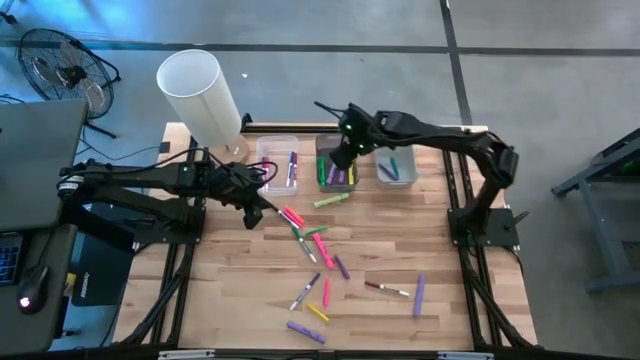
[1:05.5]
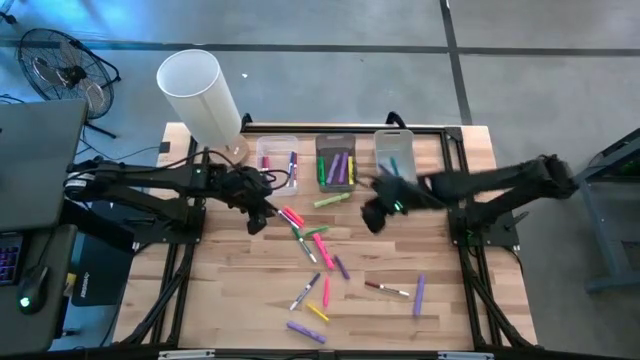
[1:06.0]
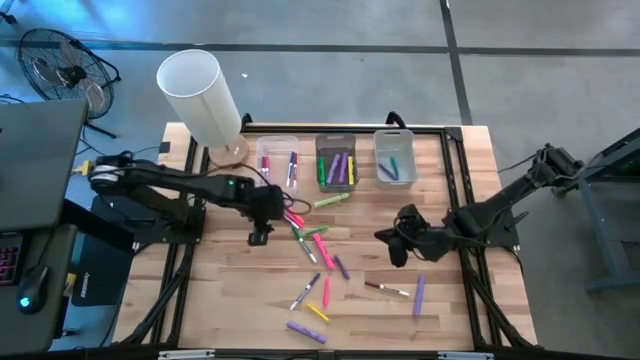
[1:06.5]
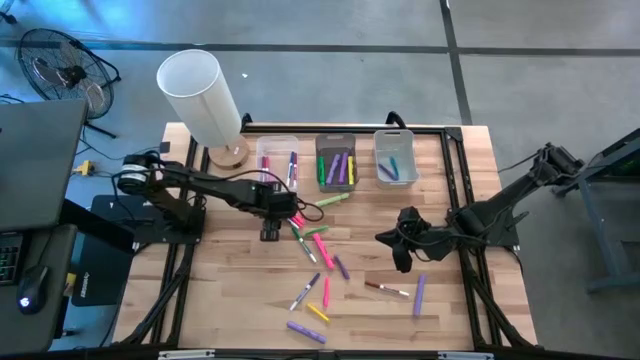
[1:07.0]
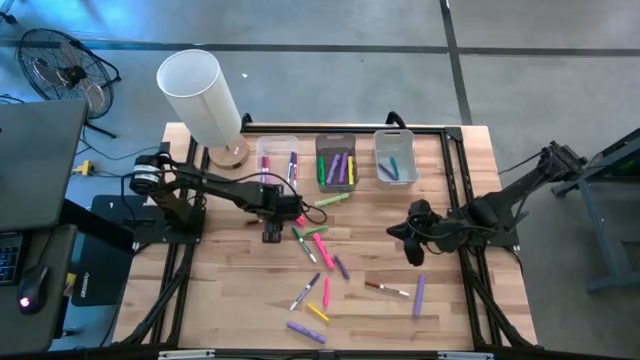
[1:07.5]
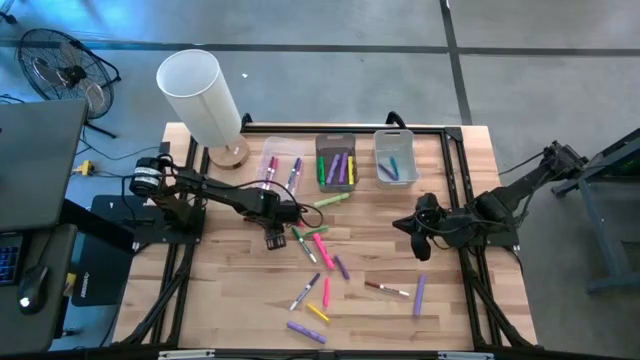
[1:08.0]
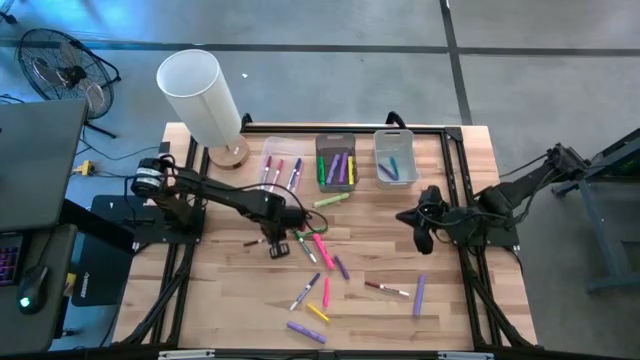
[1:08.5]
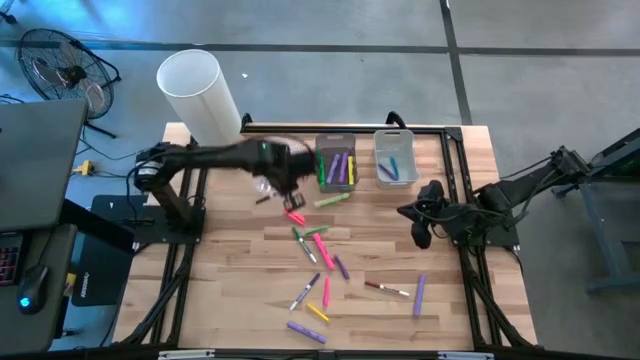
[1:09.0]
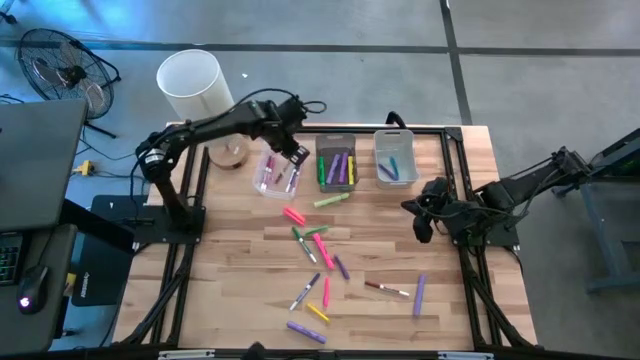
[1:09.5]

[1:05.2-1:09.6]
Task: Pick & Place Markers
Put the black dry erase marker into the transparent bin

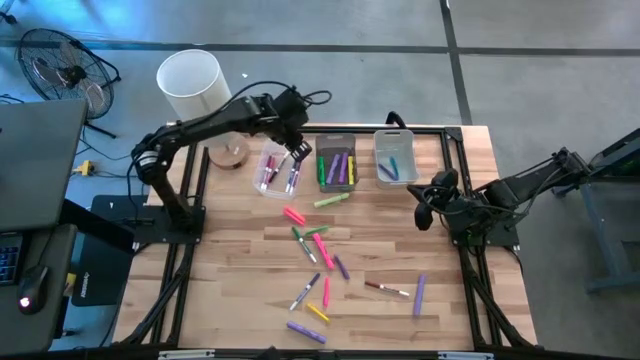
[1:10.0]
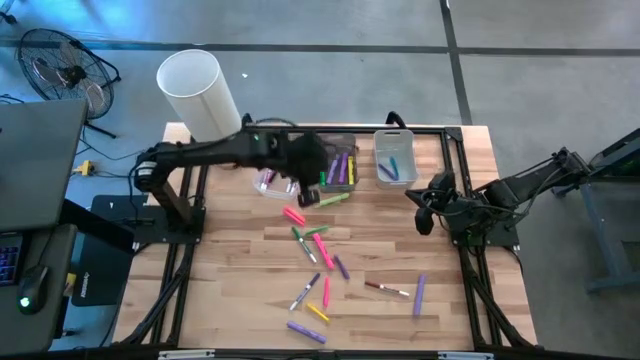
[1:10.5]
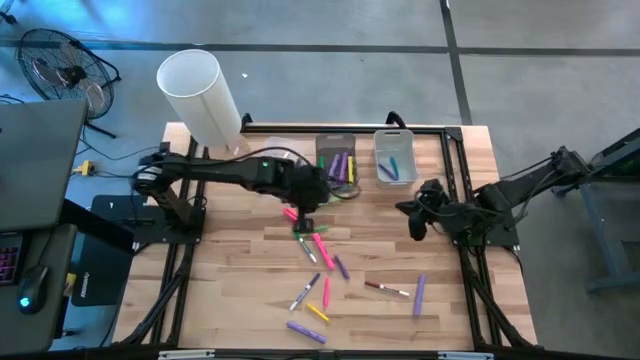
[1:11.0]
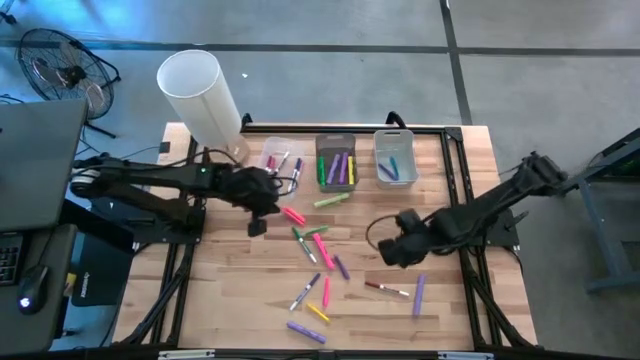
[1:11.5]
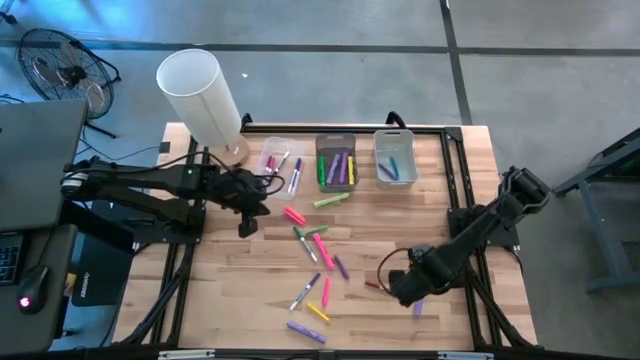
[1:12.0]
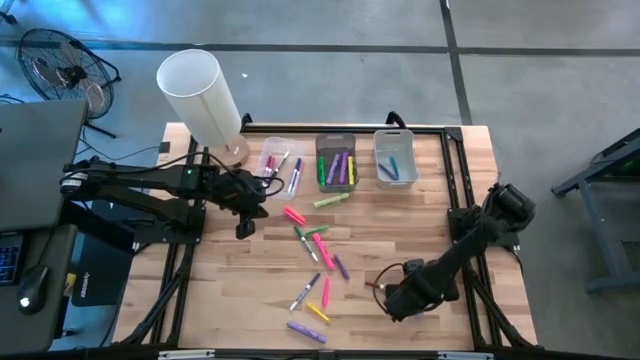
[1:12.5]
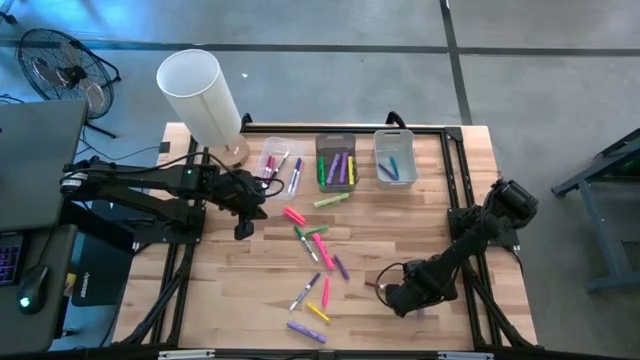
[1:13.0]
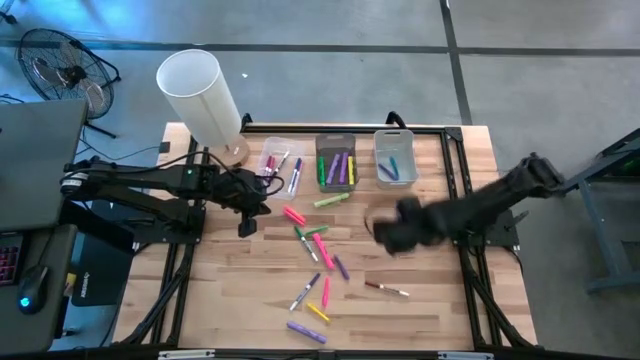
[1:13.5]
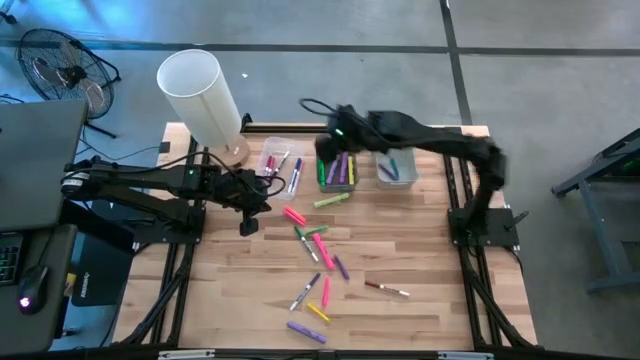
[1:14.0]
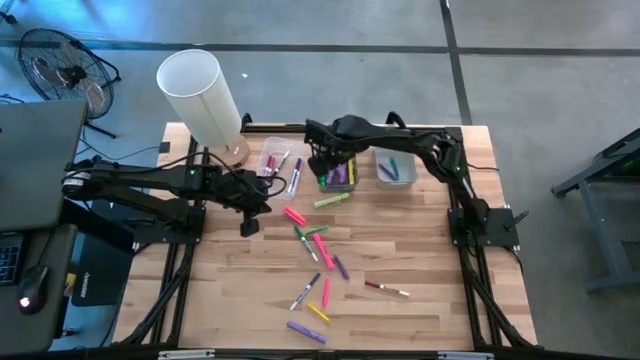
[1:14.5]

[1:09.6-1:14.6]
Put the right violet highlighter into the black bin

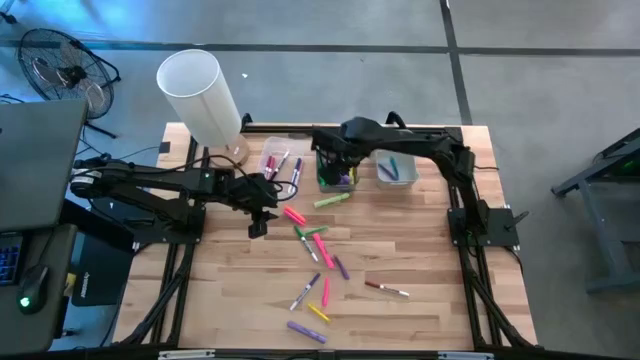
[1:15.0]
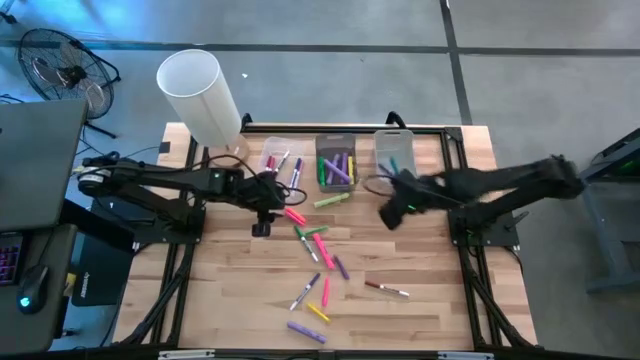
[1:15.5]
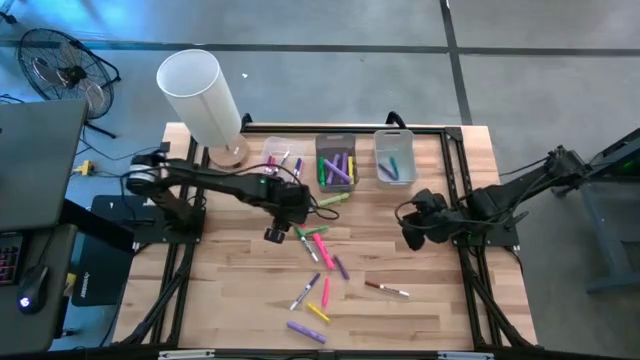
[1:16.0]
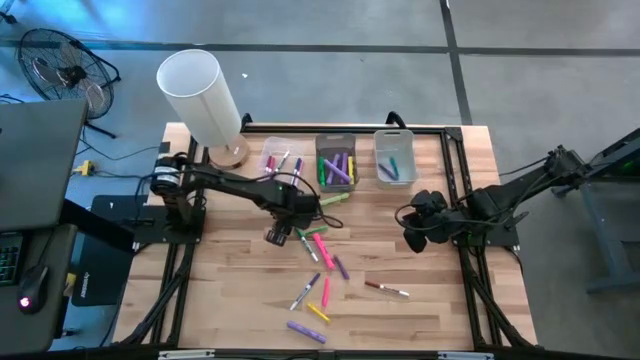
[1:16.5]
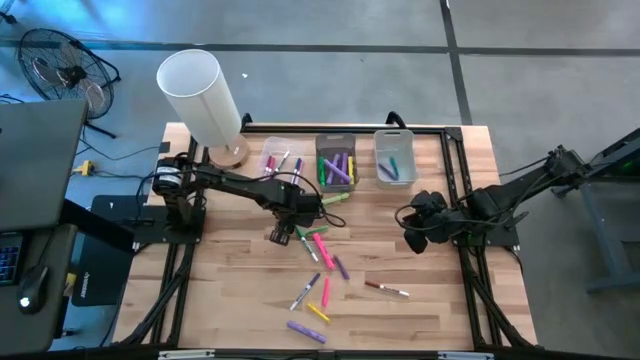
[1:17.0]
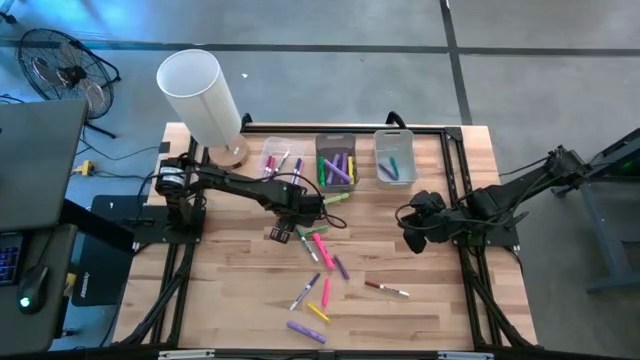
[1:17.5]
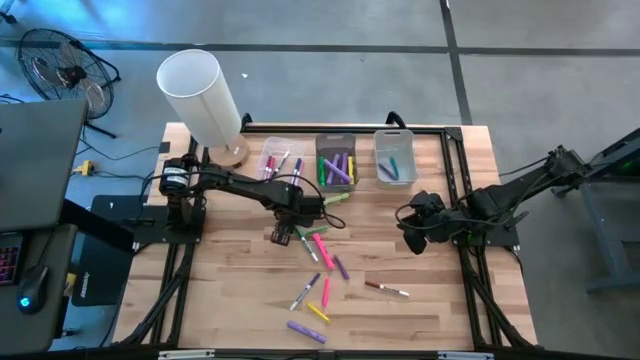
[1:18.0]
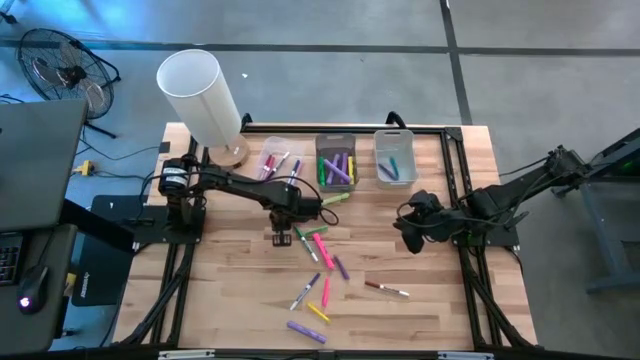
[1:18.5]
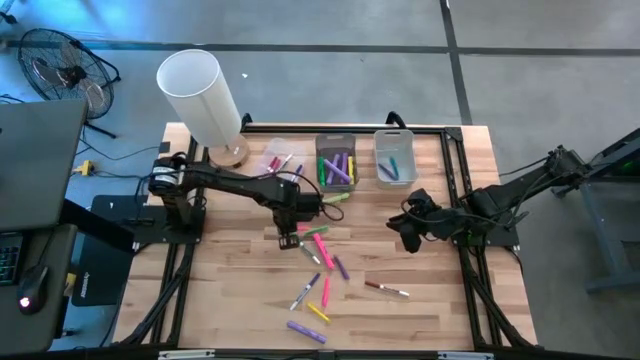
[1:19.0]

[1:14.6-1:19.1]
Put the top pink pen into the gray bin

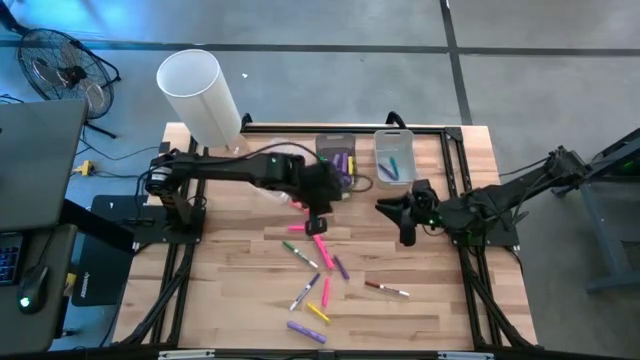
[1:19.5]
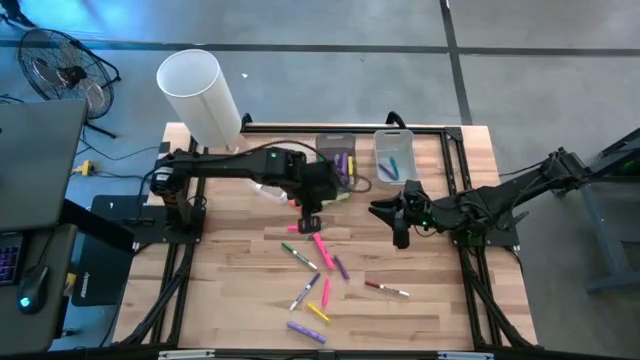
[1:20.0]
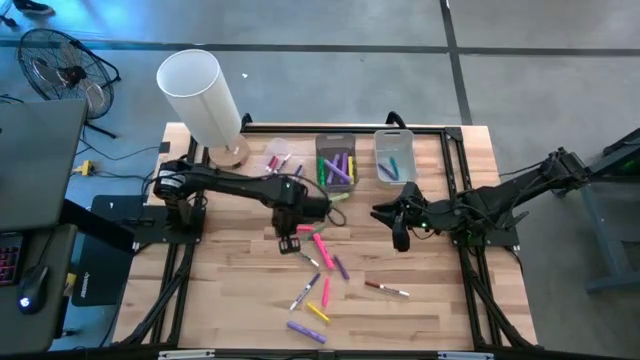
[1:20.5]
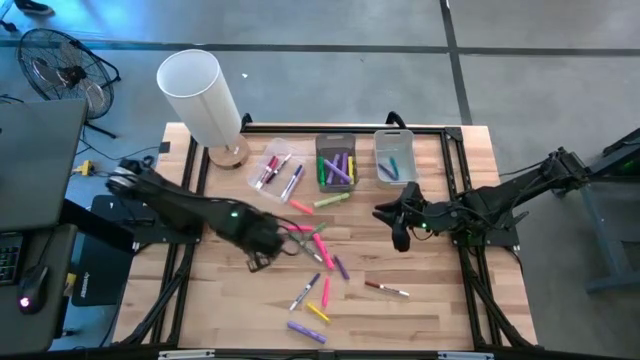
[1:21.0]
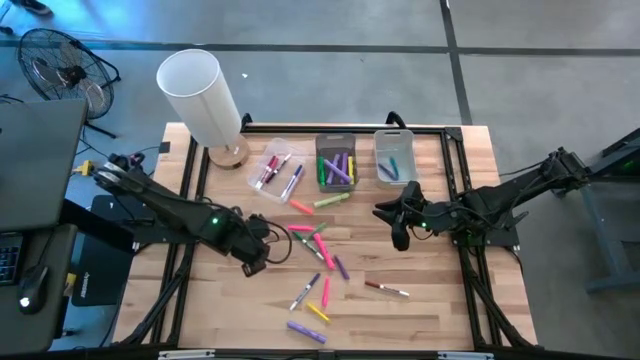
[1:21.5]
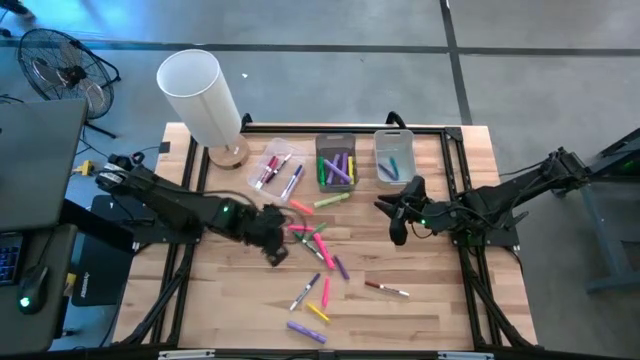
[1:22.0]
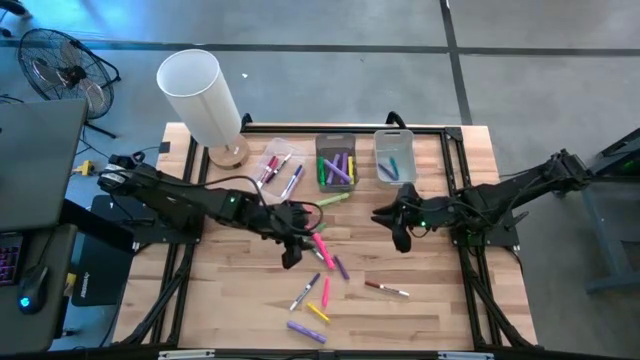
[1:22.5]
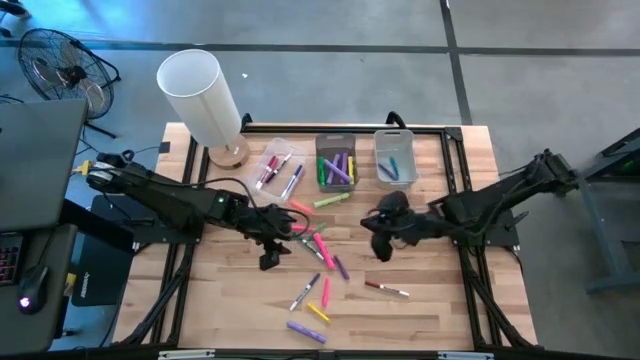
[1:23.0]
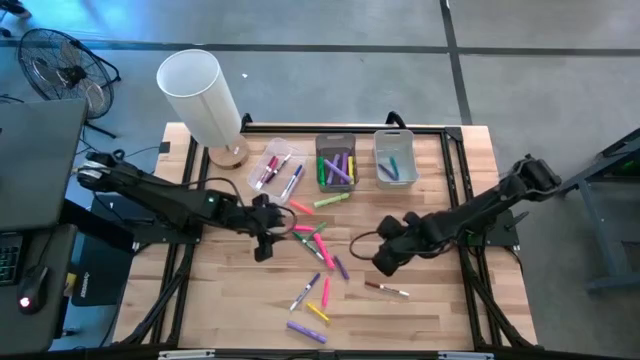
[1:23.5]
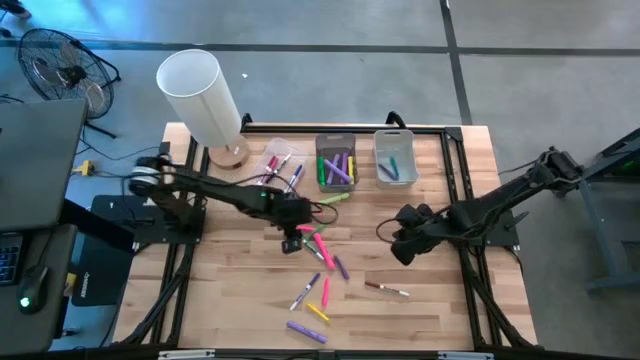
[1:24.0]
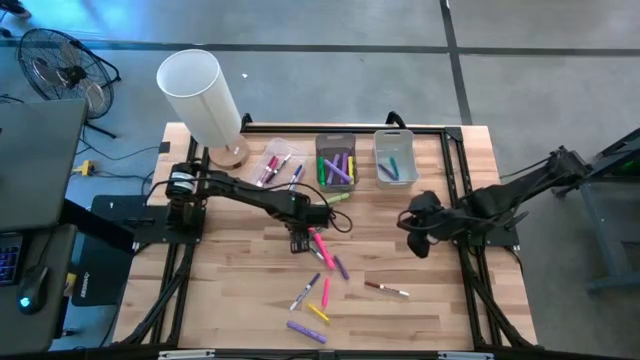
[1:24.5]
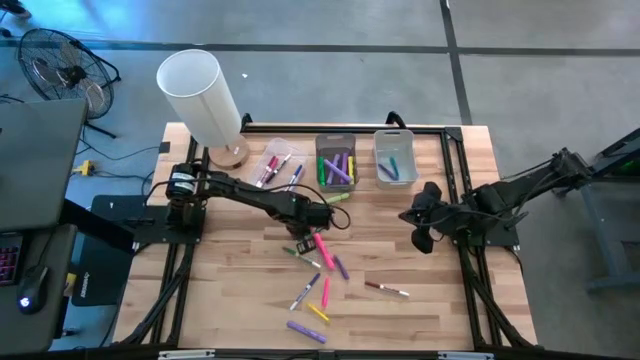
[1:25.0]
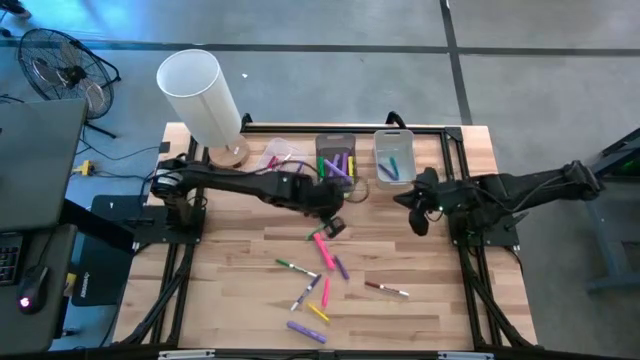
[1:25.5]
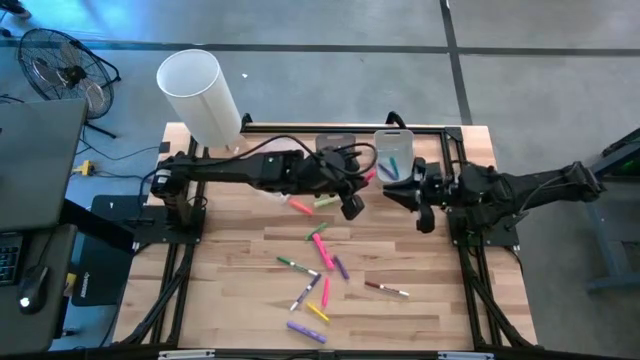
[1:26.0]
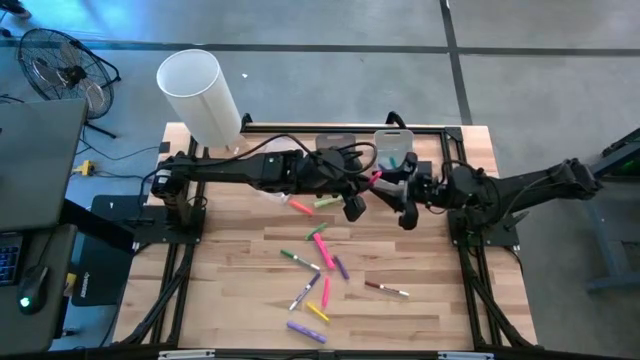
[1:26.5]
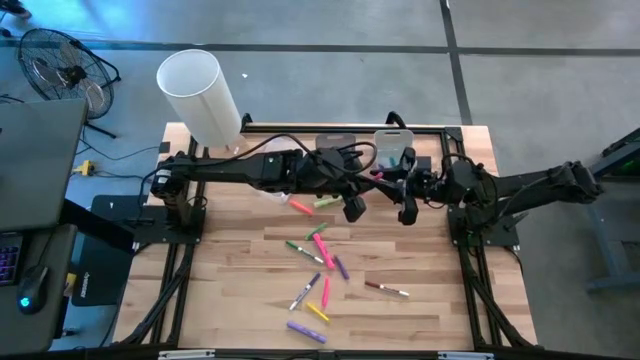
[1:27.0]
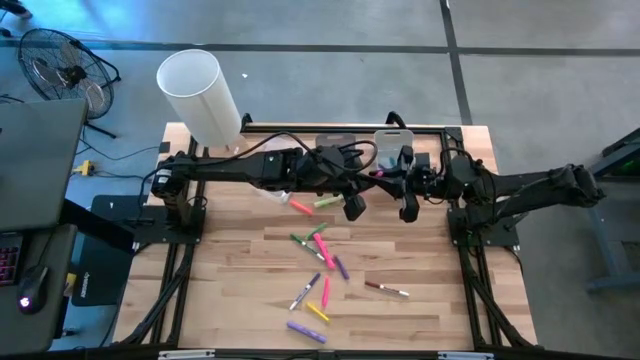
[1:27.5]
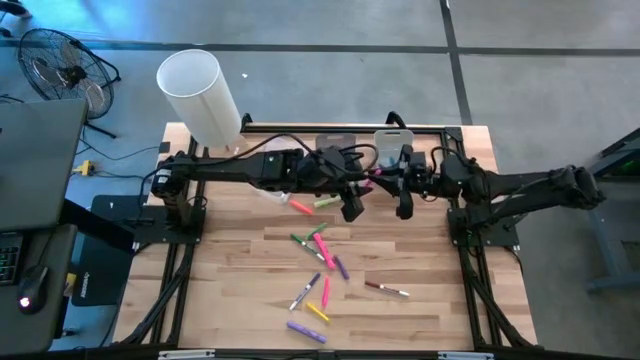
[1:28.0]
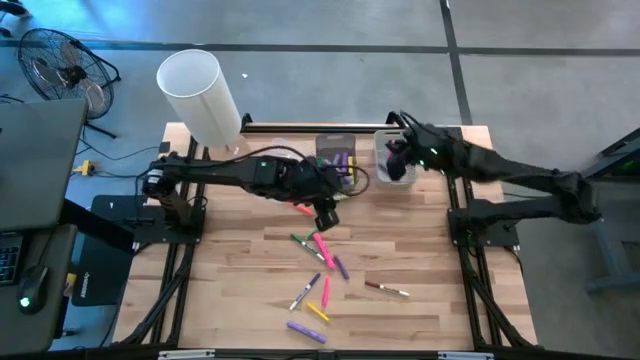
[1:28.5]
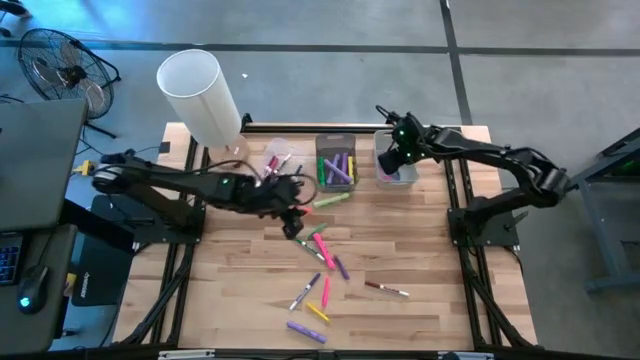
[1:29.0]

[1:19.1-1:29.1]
Put the top pink pen into the gray bin
